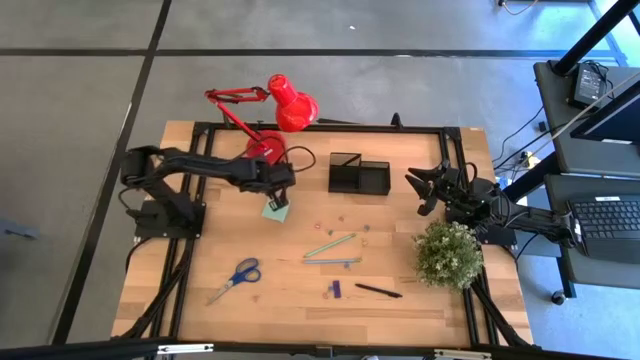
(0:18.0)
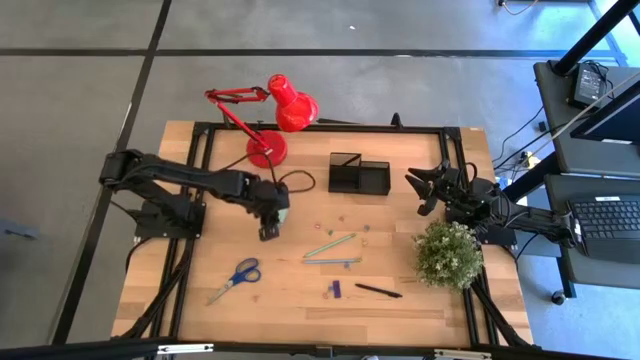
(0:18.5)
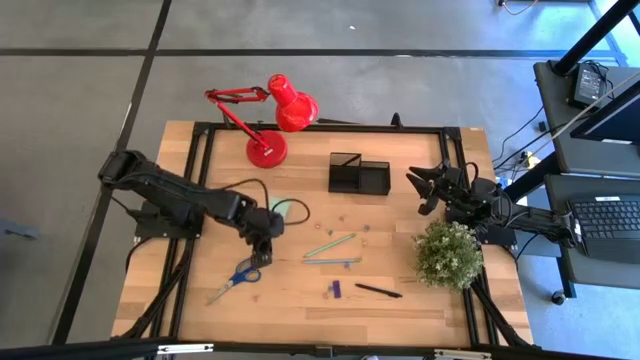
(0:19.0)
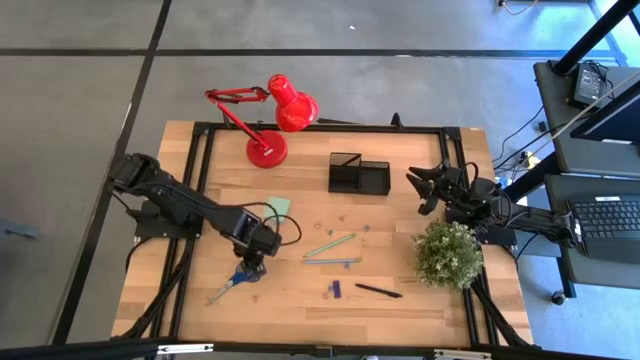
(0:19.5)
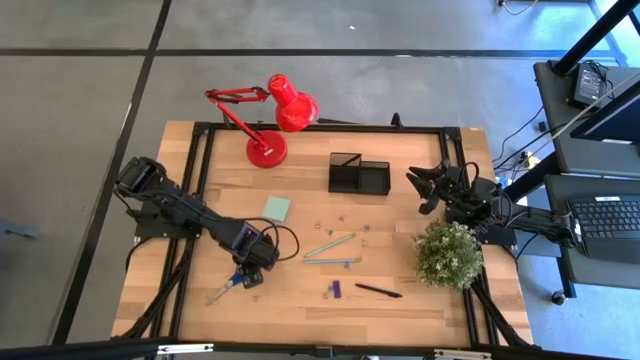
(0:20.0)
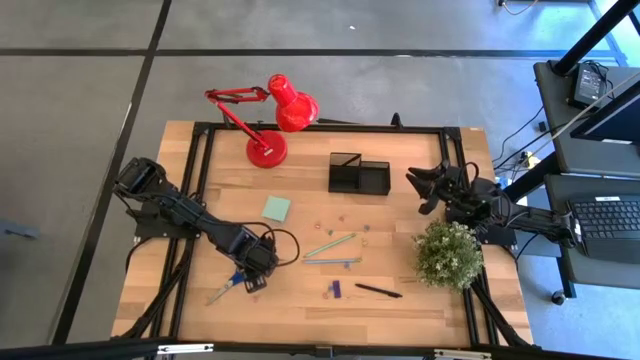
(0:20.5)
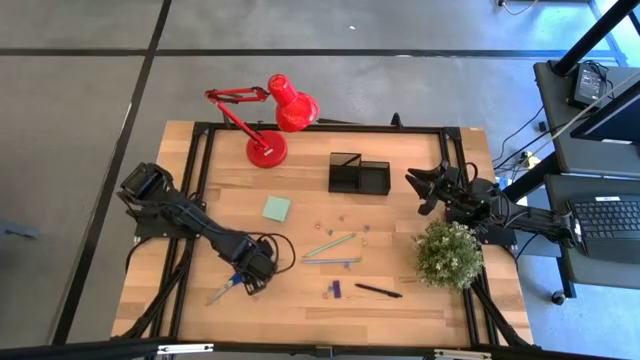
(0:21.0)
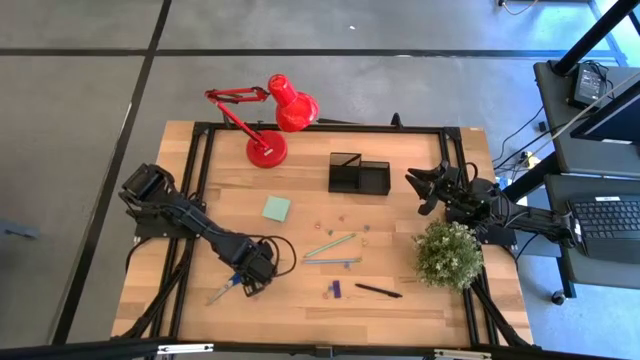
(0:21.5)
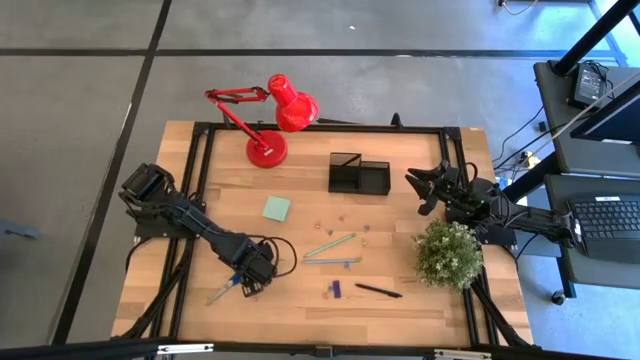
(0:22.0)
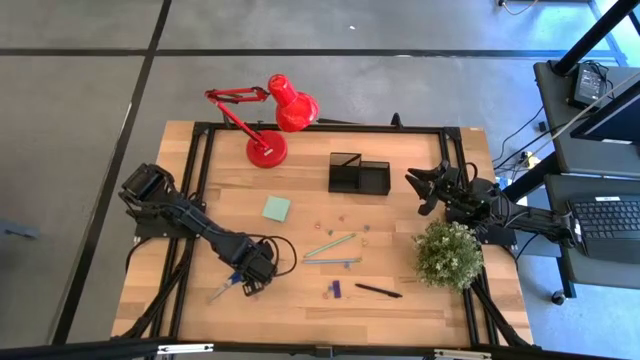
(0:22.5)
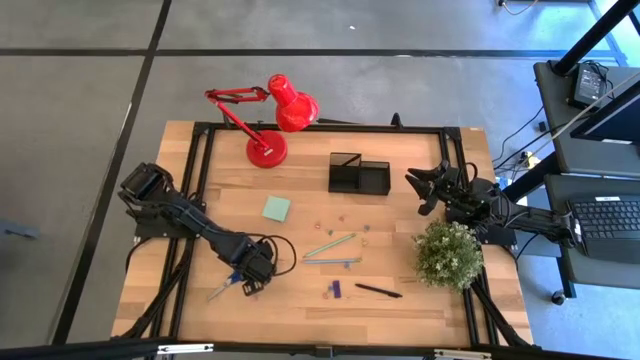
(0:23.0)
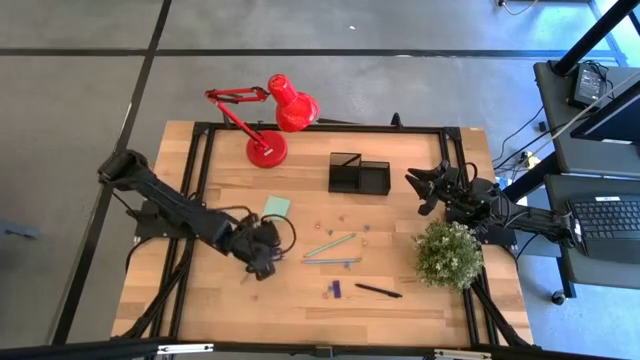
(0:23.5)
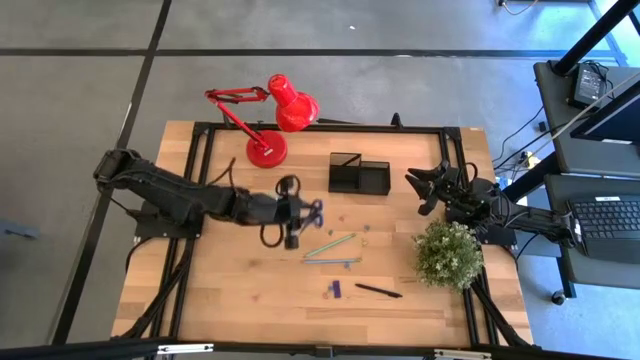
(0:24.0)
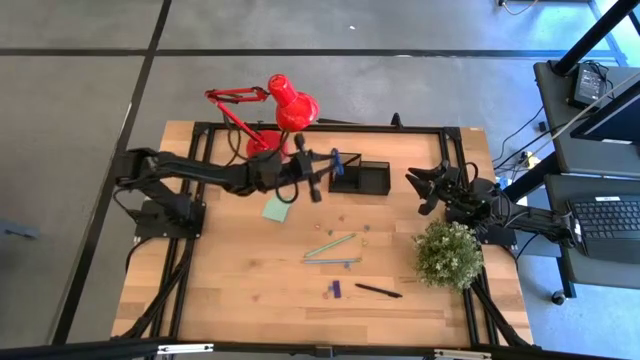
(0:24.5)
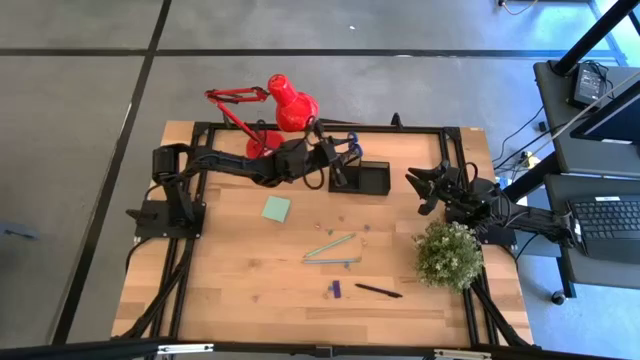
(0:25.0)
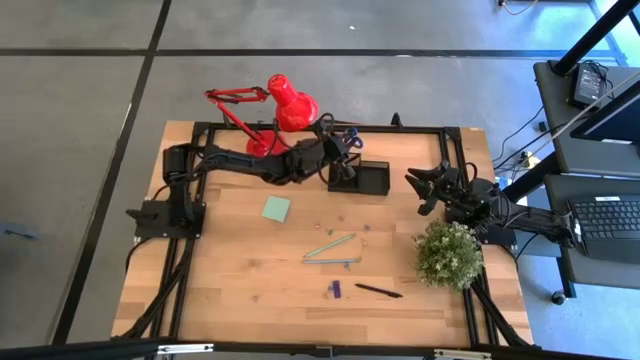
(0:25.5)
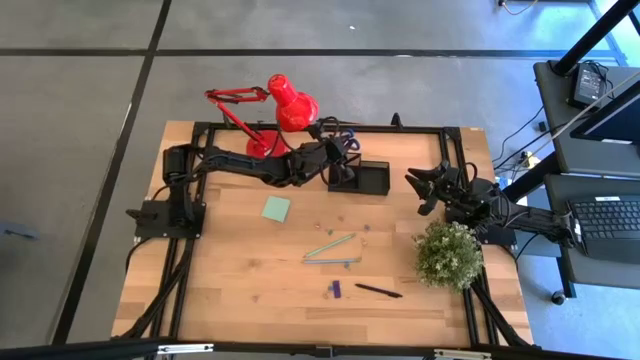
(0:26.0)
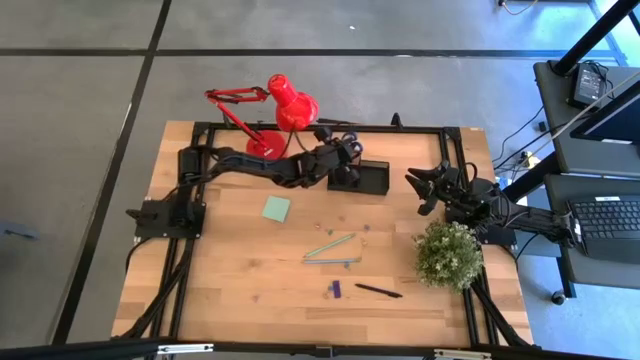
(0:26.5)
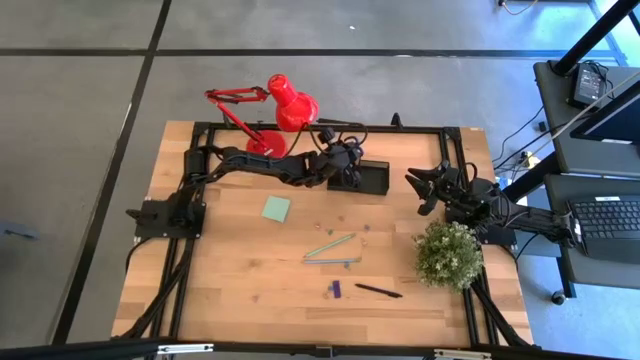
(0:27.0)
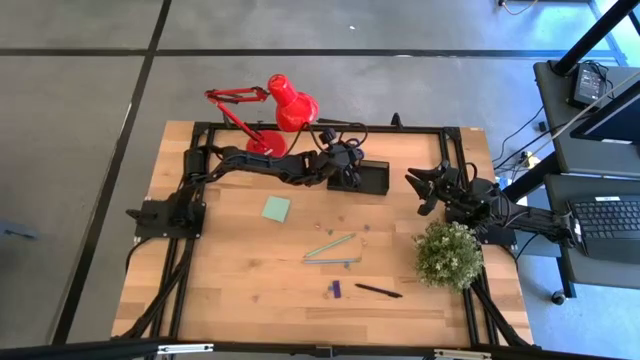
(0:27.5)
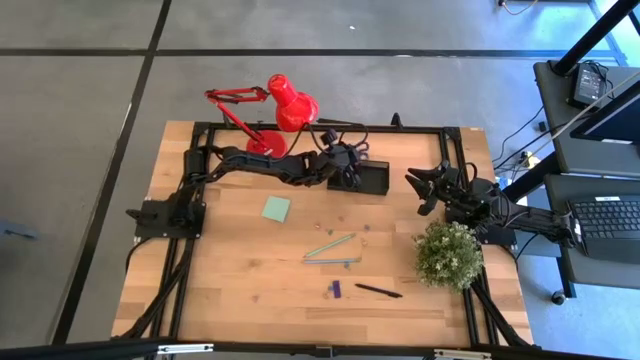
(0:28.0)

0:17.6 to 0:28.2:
Task: Pick and place office supplies into organizer
Put the blue scissors into the black desk organizer

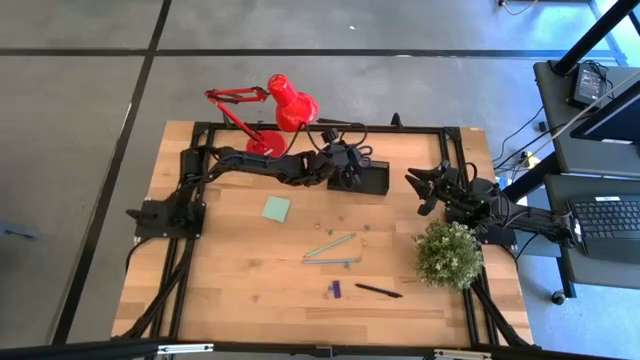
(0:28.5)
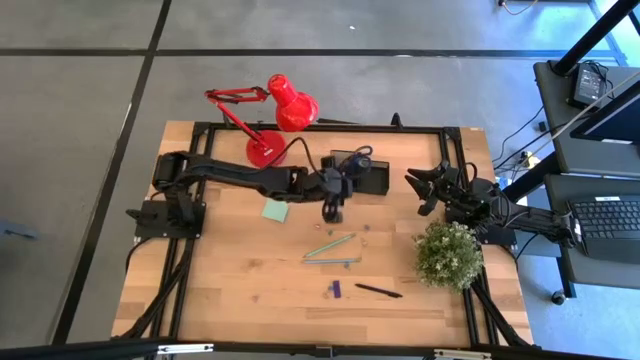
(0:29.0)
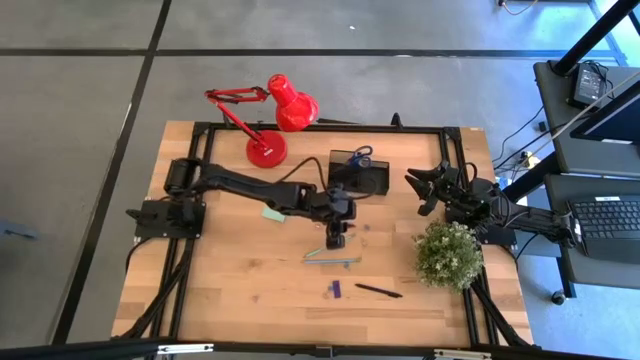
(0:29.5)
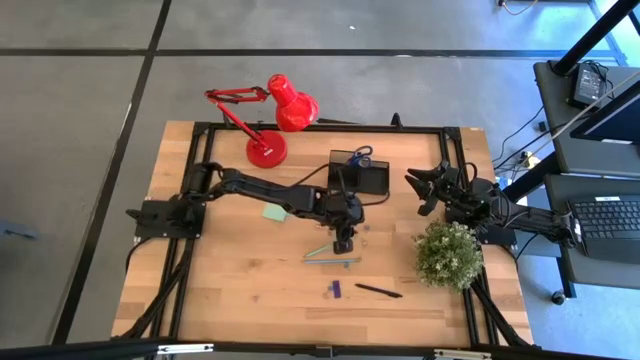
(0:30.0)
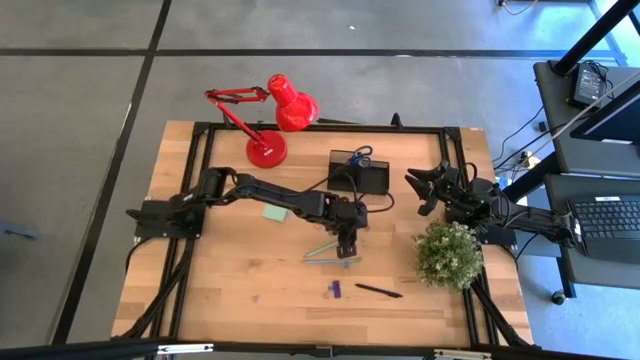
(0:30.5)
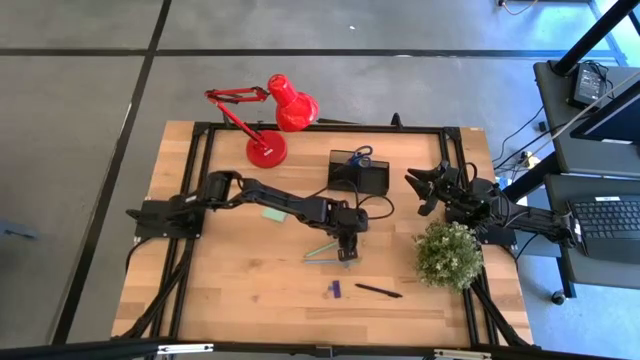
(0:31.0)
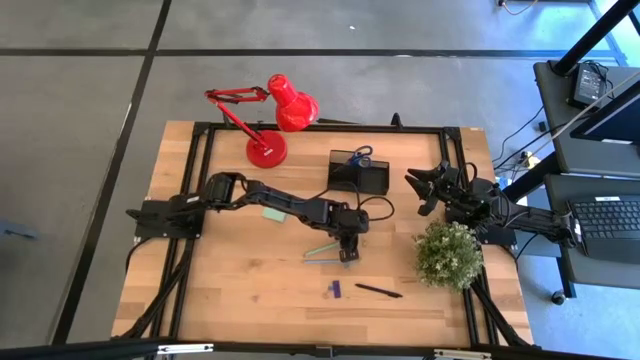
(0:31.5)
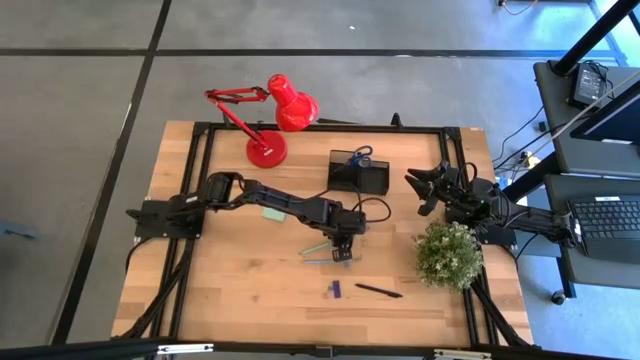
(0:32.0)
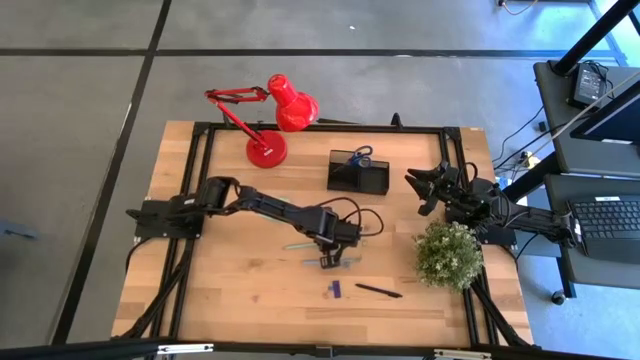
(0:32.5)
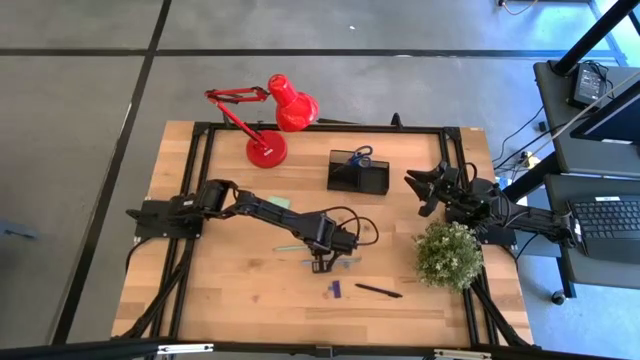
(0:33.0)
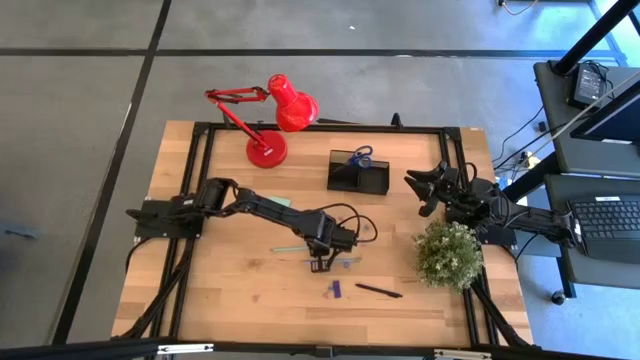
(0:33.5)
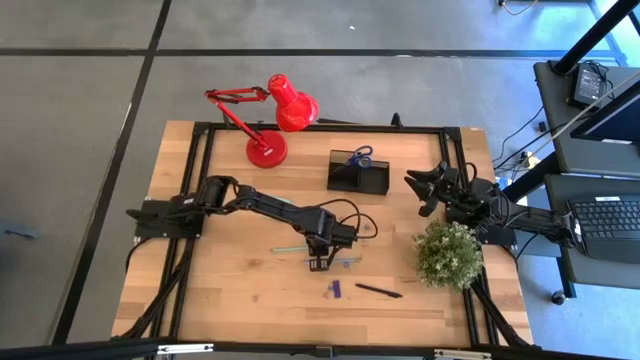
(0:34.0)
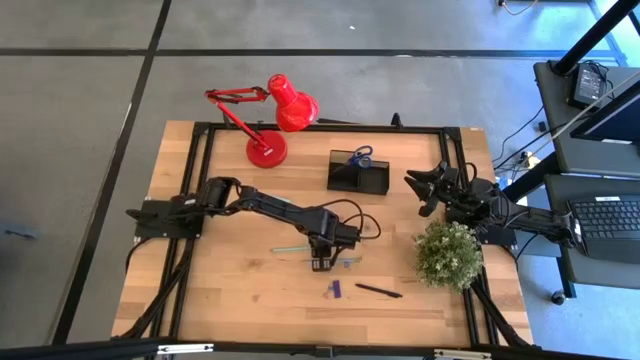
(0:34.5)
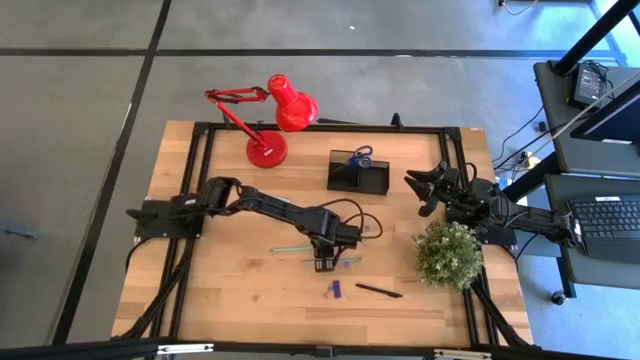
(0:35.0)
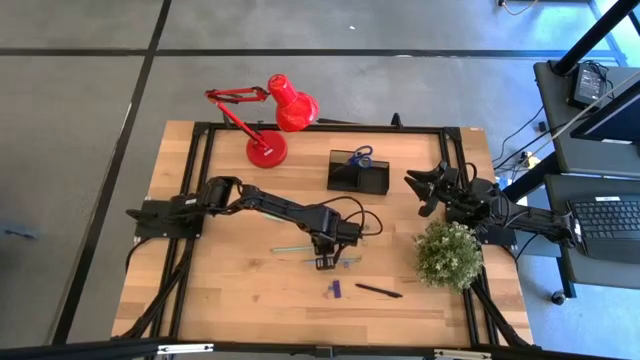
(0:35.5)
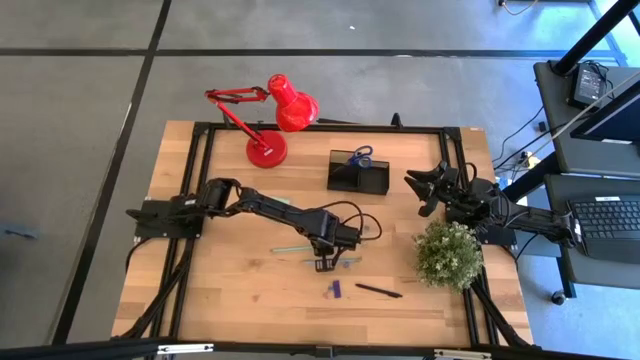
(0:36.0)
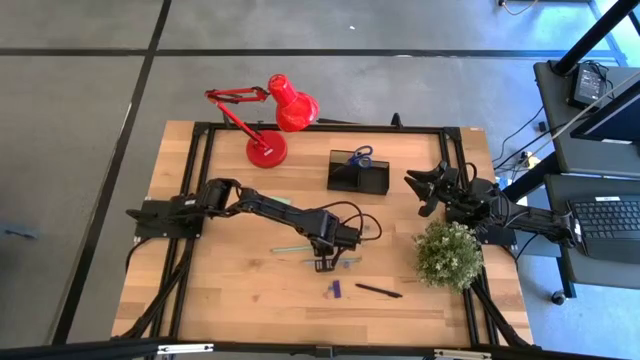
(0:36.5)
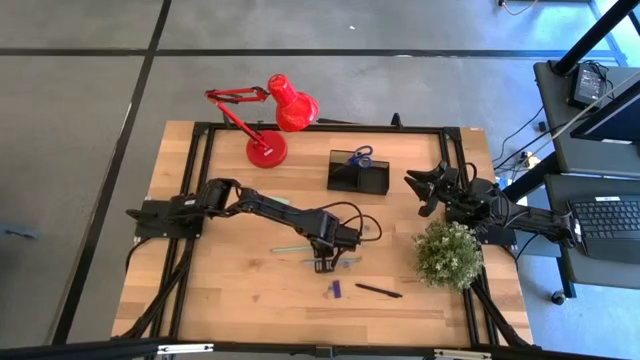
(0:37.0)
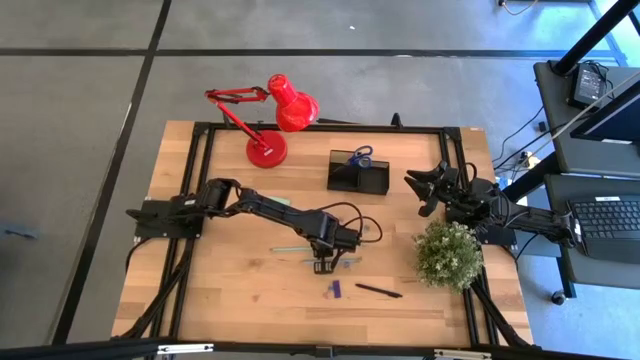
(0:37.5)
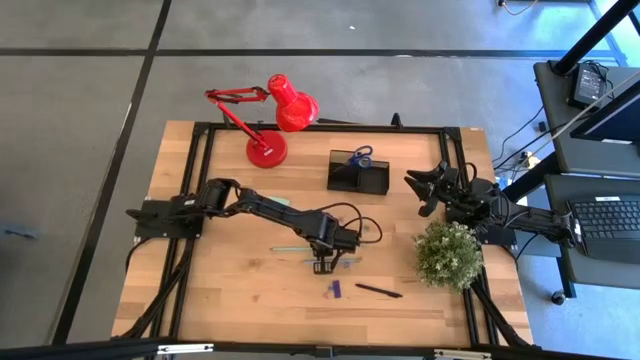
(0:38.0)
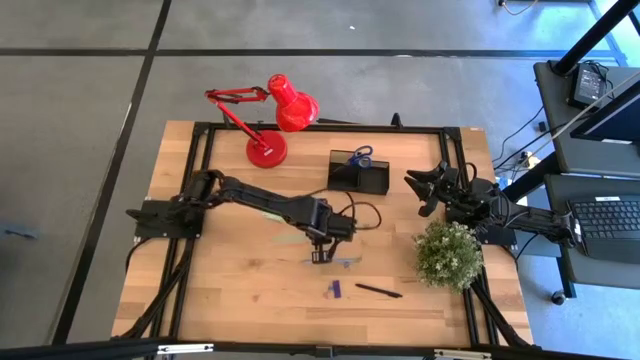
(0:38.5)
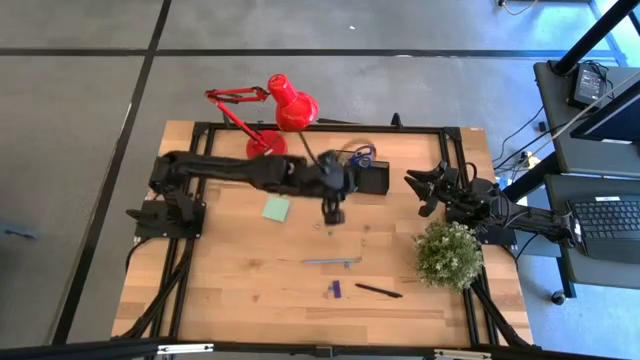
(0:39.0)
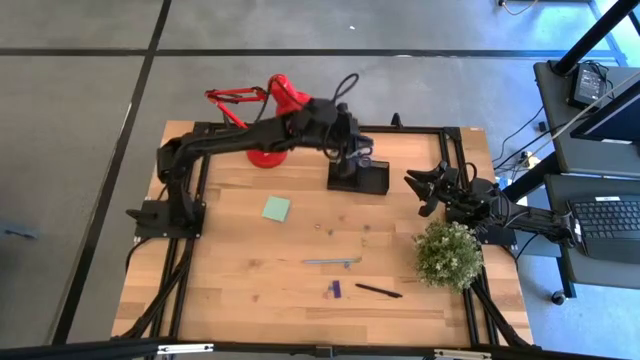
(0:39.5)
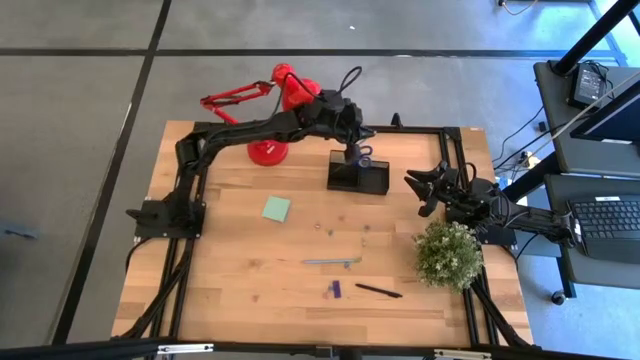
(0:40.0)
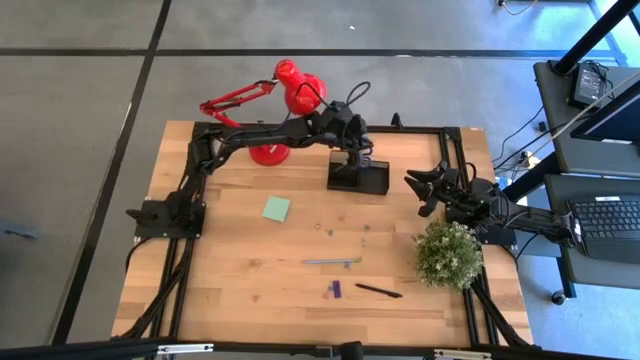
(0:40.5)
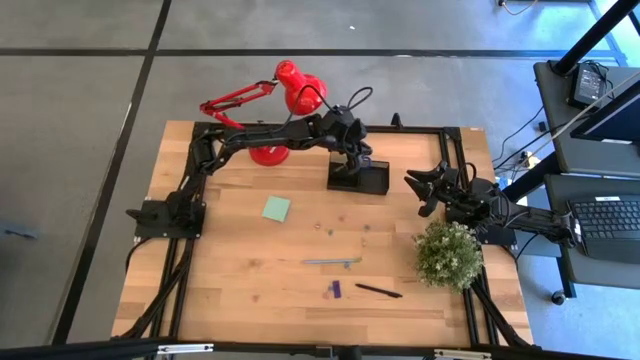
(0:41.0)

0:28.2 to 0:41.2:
Put the light blue pencil into the black desk organizer
